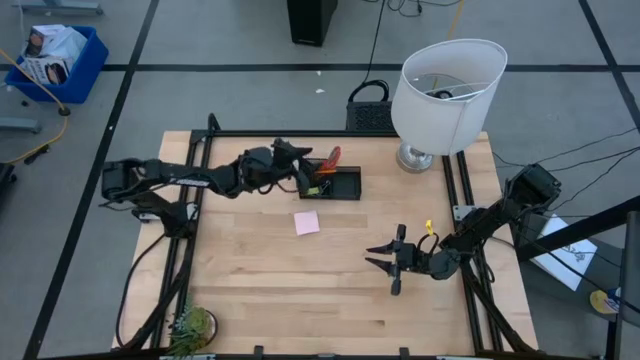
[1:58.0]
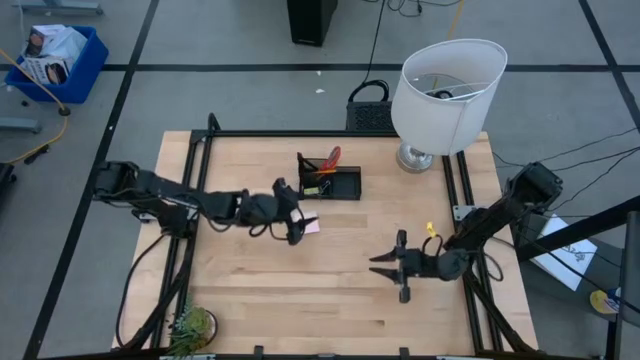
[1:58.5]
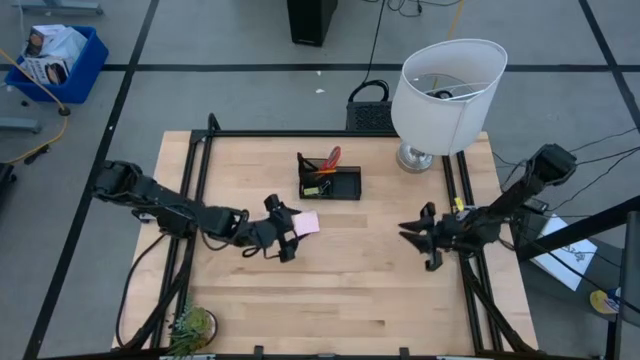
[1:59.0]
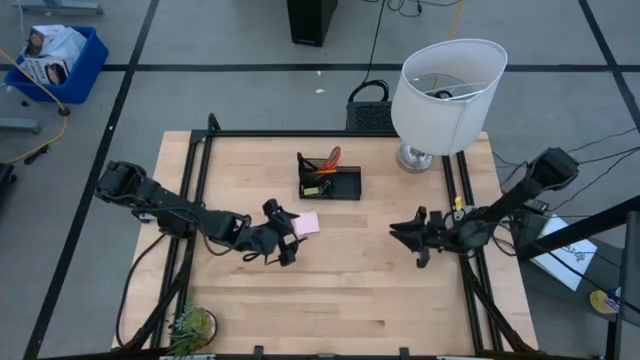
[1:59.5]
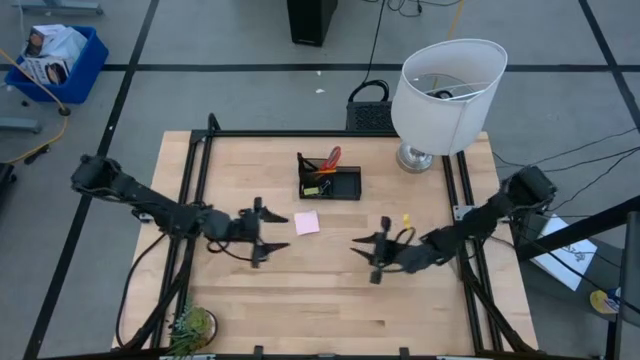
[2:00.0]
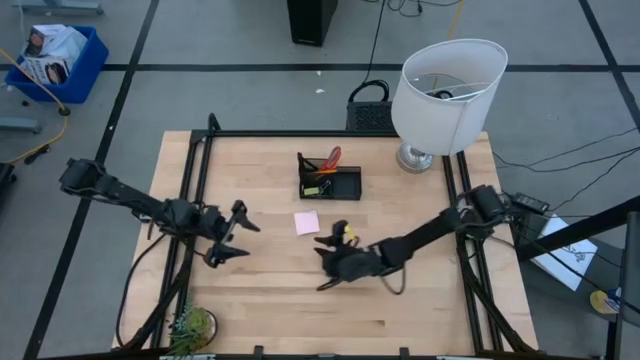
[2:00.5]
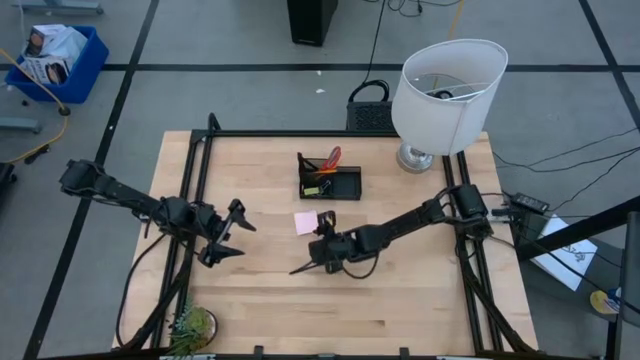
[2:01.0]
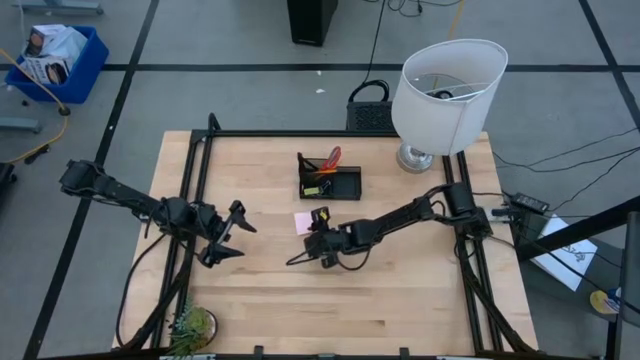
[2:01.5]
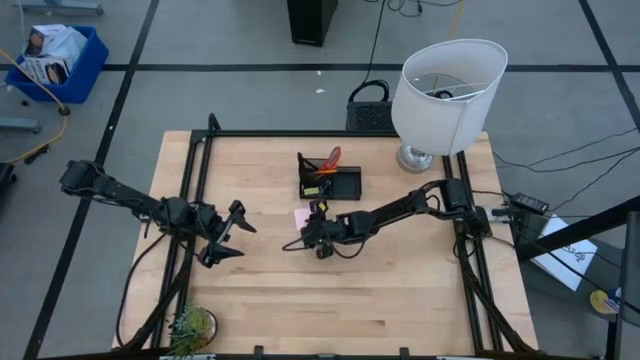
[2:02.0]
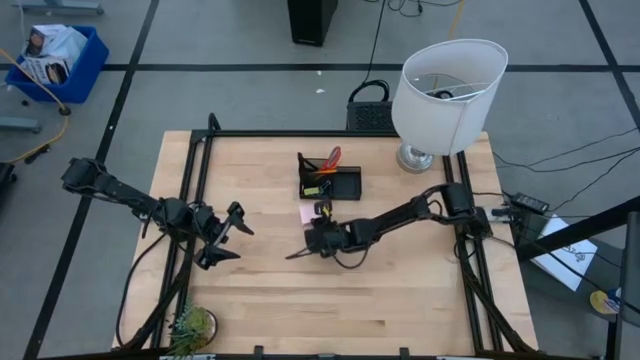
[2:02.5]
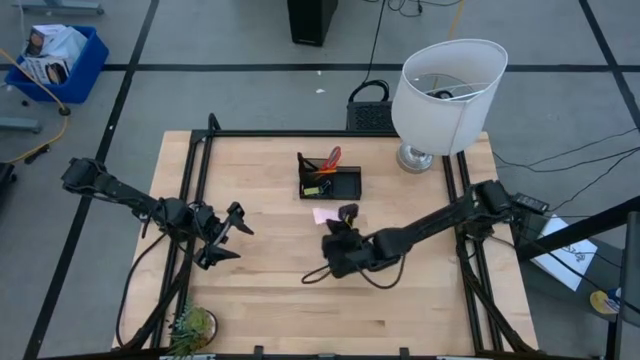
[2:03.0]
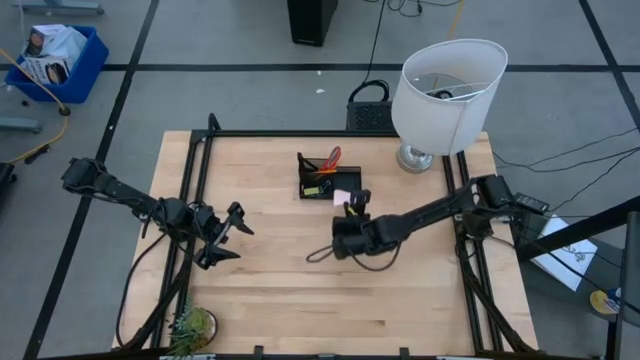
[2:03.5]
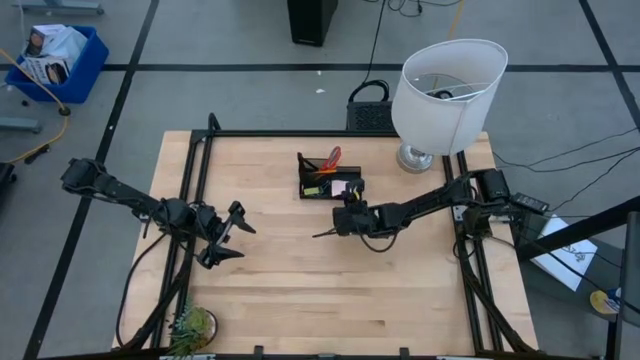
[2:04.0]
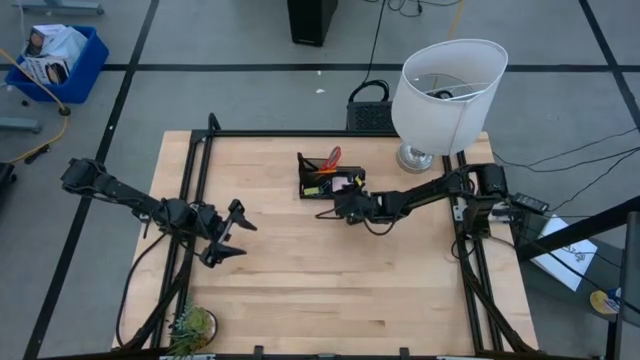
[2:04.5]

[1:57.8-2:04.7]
Task: Pick and place office supplies into organizer
Put the pink sticky notes into the desk organizer

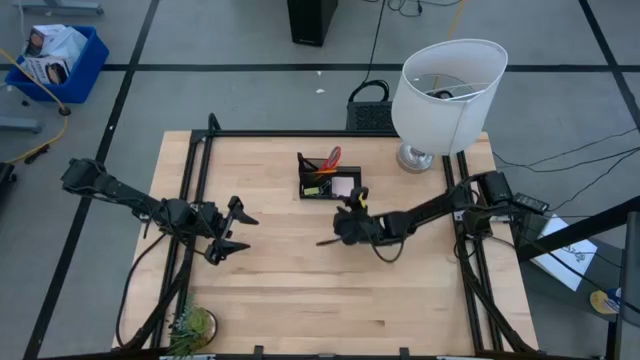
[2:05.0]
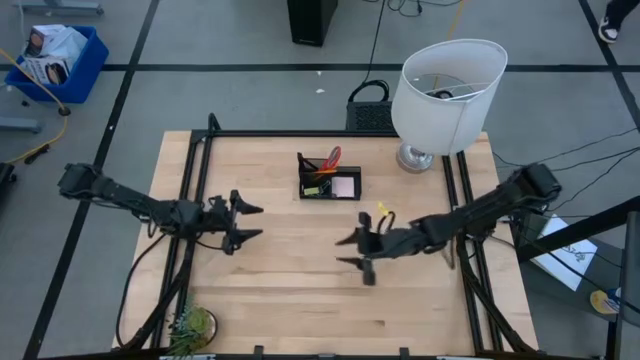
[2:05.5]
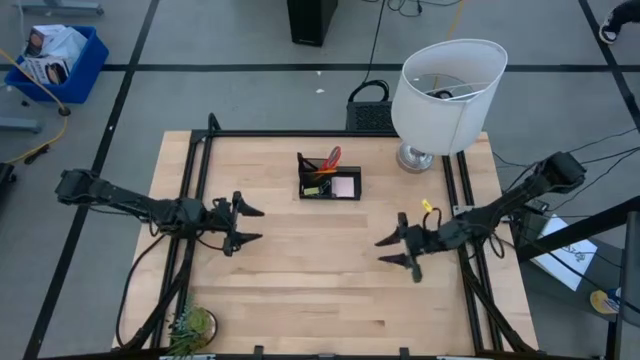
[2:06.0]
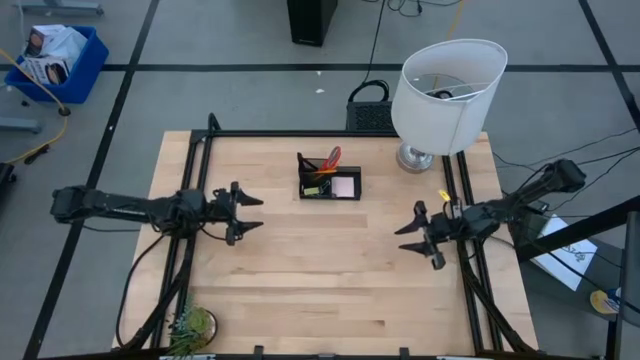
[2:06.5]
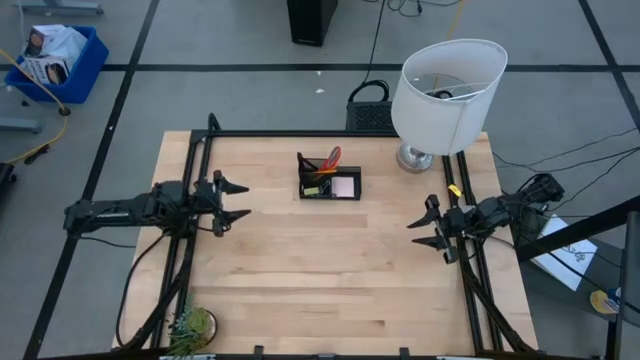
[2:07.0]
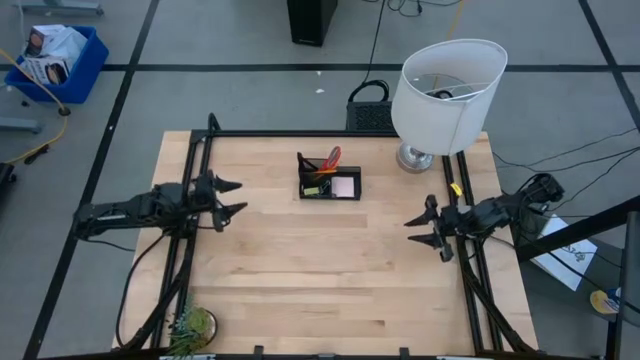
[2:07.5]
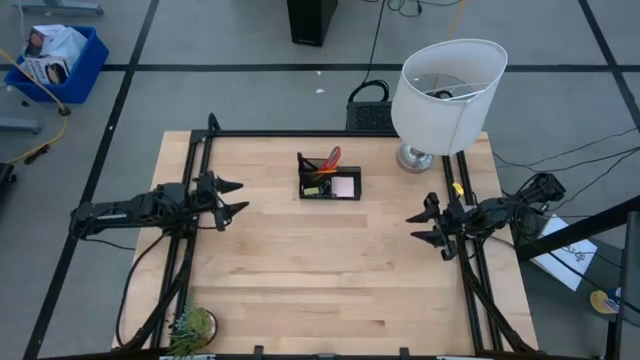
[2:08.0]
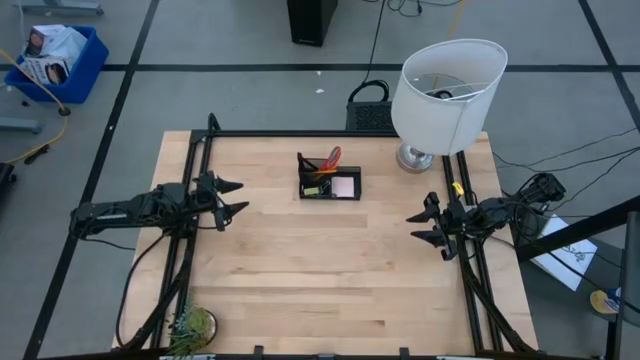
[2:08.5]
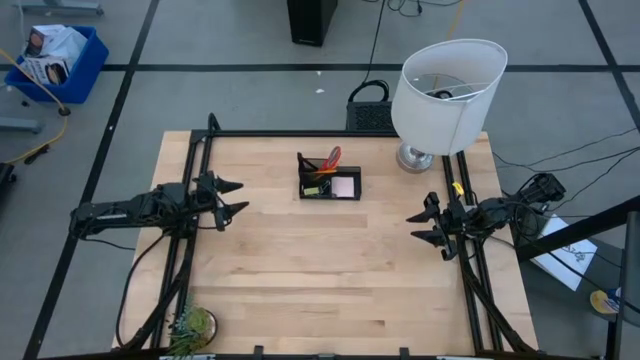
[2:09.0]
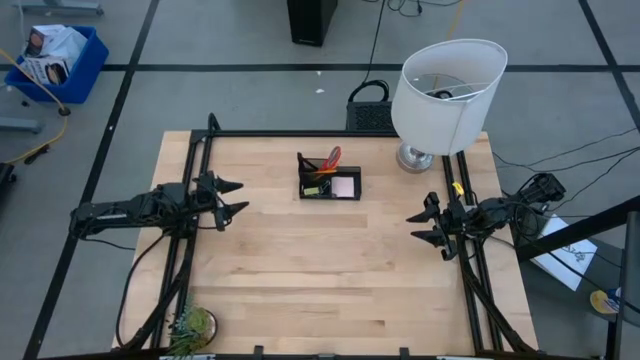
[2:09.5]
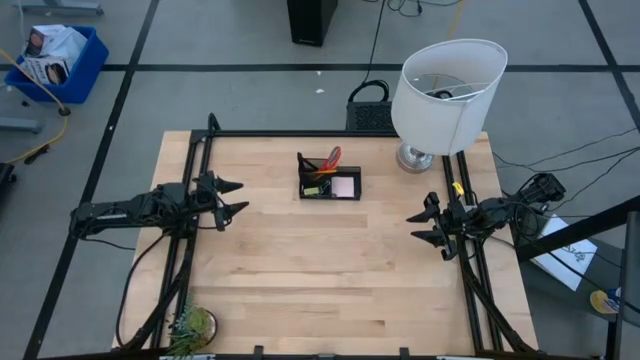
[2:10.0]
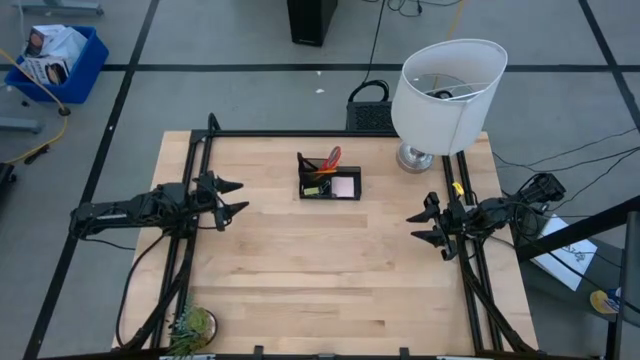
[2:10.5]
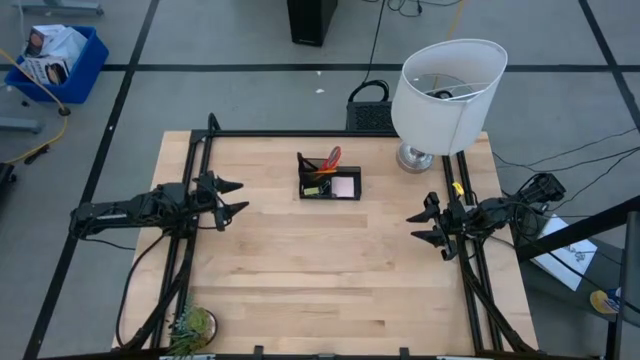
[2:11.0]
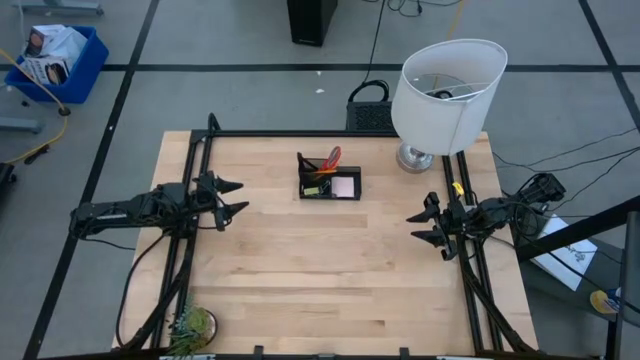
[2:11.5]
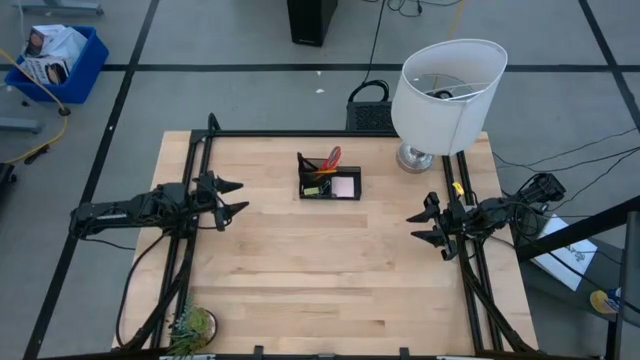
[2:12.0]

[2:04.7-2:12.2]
Return to Home Position

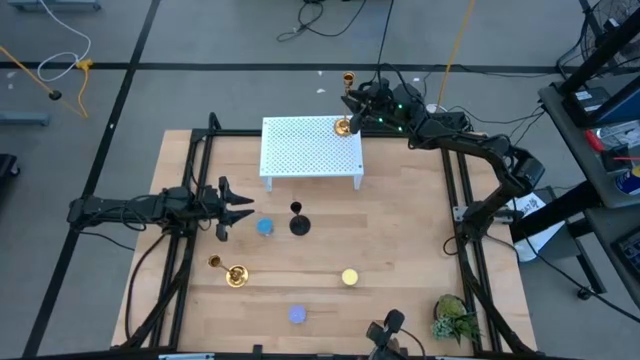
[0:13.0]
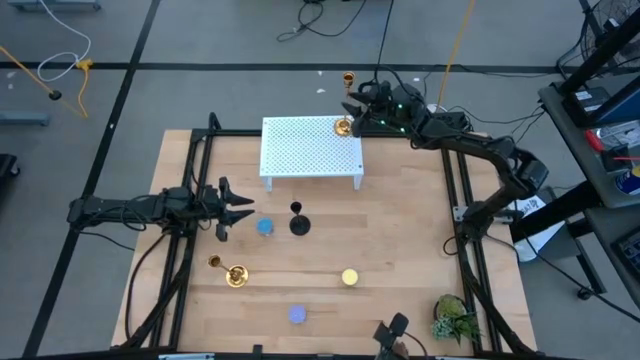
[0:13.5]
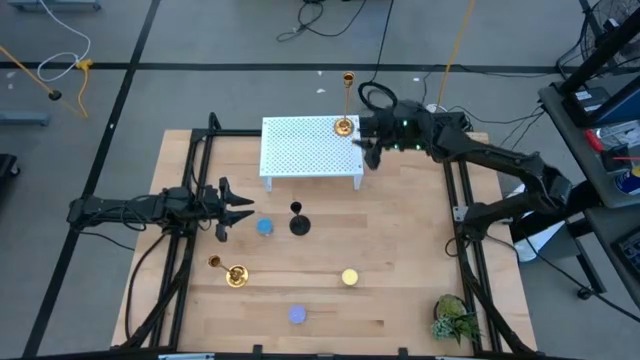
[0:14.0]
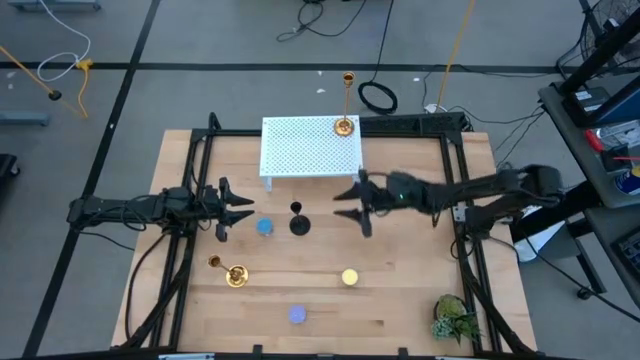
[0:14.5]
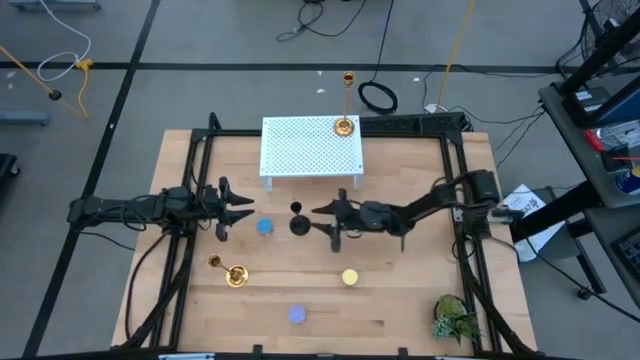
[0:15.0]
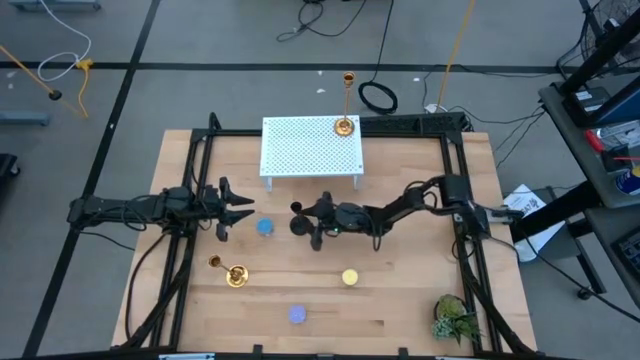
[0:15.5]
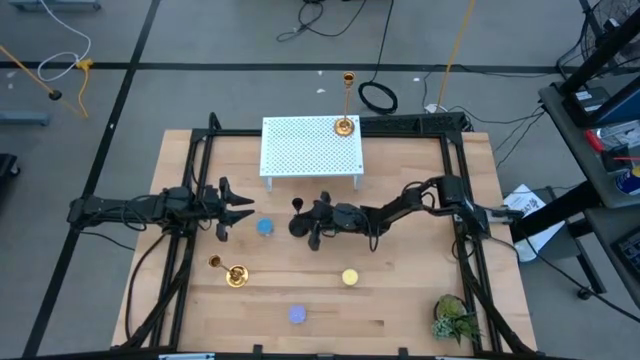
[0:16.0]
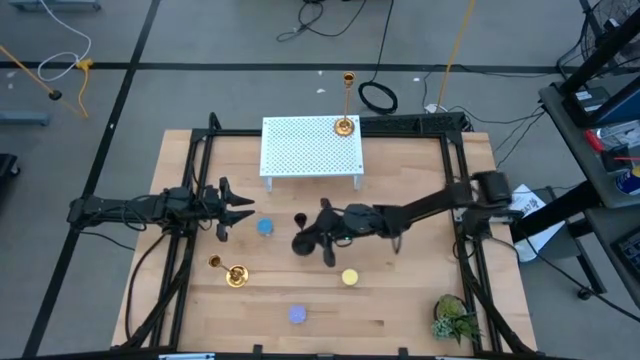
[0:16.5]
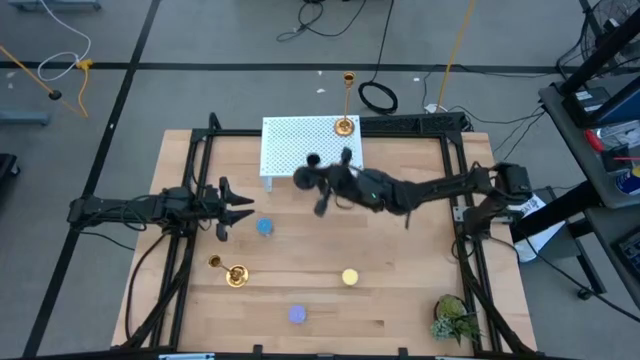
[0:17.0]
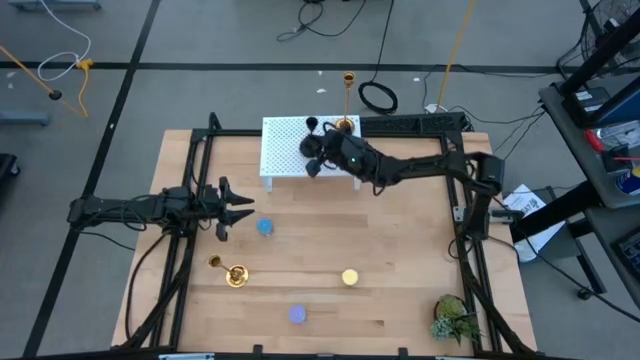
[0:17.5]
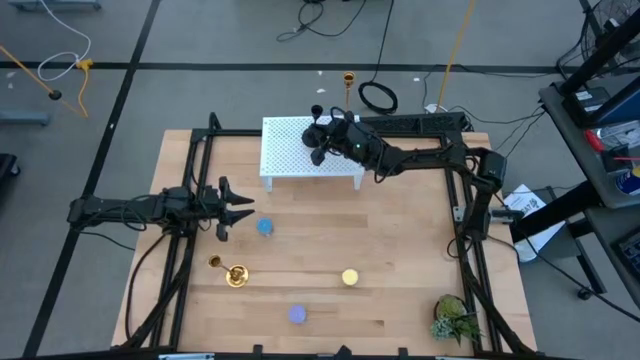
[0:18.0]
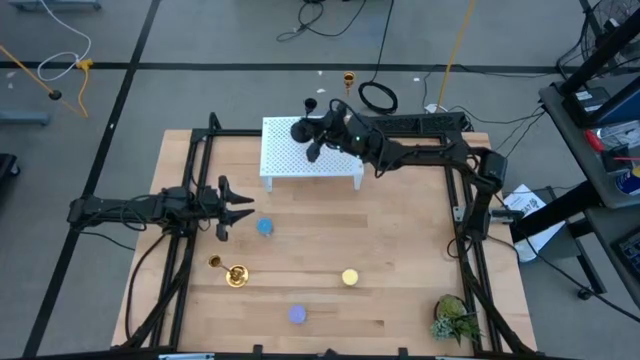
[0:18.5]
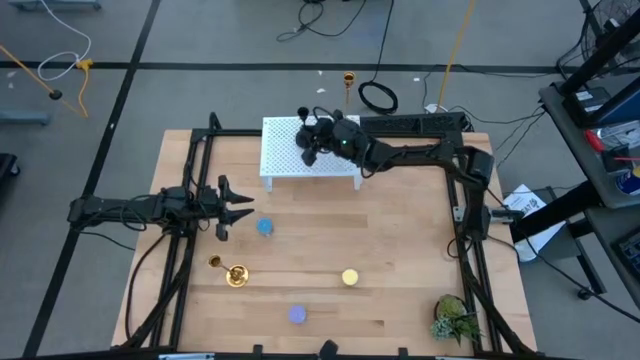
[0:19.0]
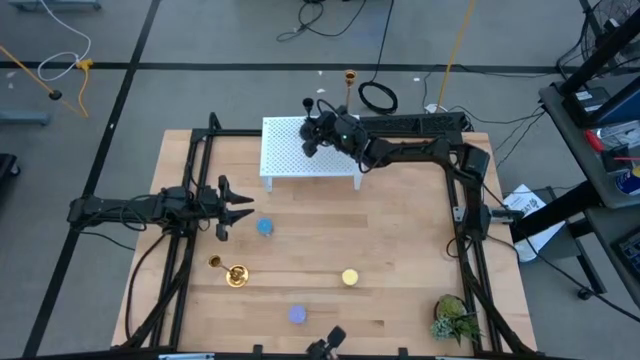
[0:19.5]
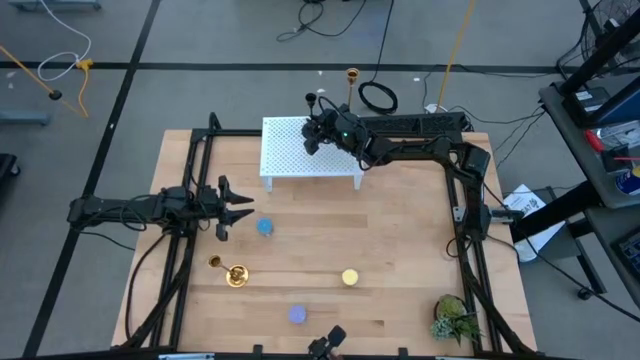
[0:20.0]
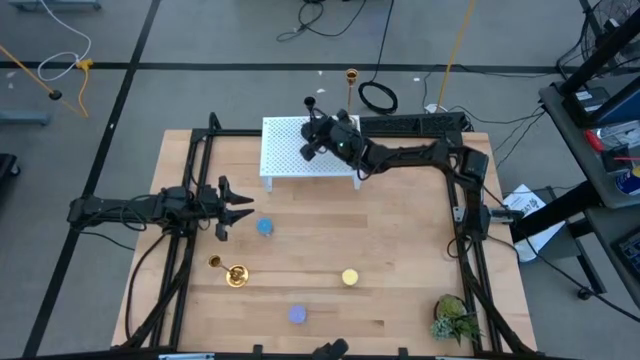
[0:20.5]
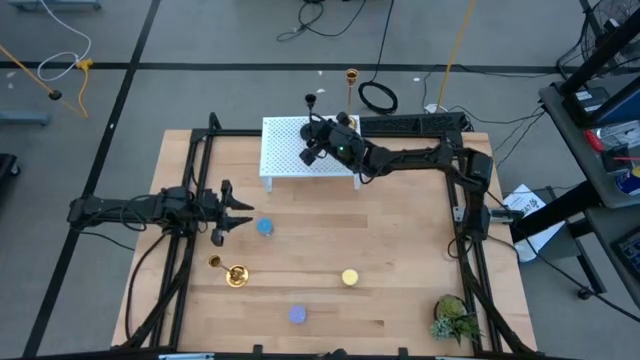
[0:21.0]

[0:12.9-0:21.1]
Task: Pick & Place candle stick holders
Put the black candle holder on the shelf
